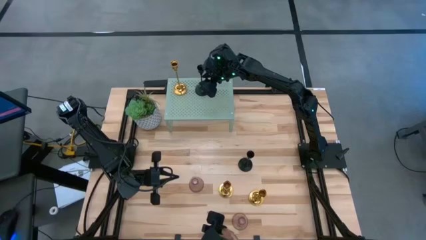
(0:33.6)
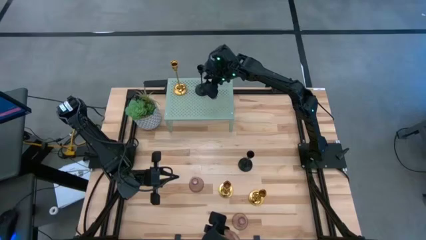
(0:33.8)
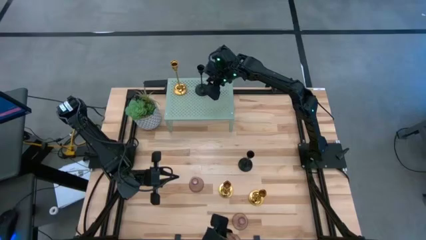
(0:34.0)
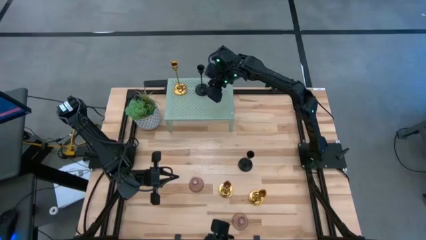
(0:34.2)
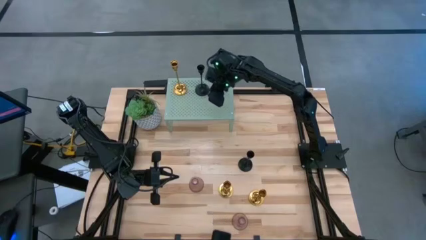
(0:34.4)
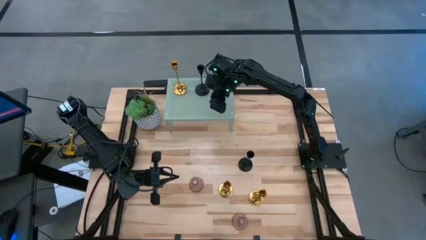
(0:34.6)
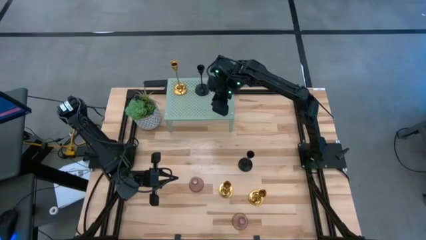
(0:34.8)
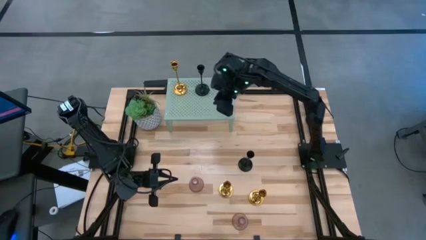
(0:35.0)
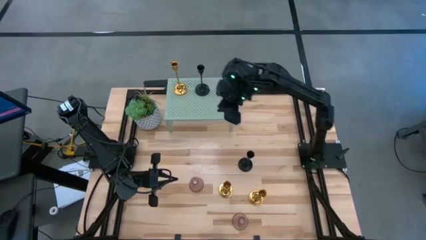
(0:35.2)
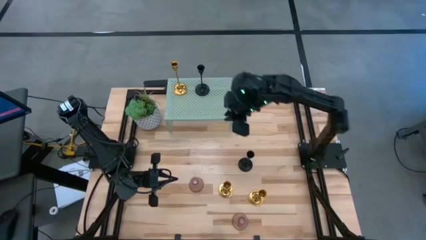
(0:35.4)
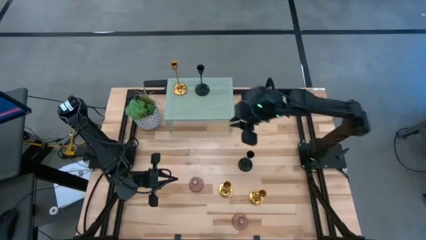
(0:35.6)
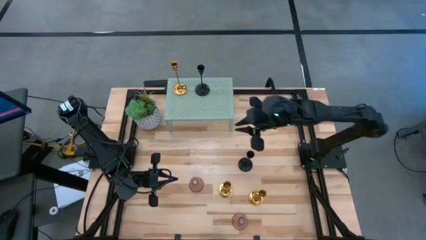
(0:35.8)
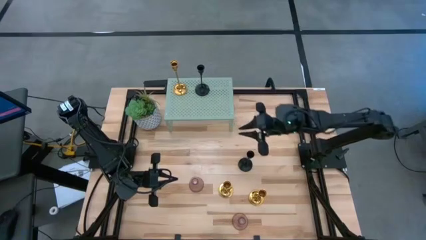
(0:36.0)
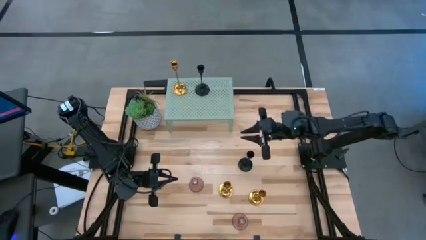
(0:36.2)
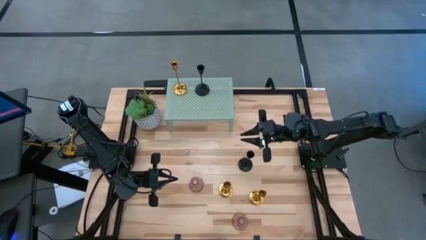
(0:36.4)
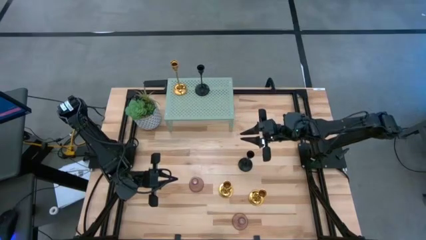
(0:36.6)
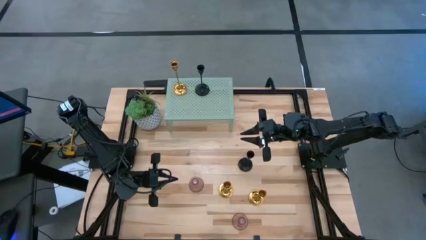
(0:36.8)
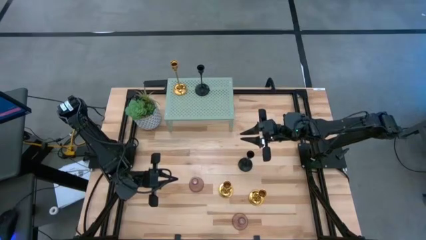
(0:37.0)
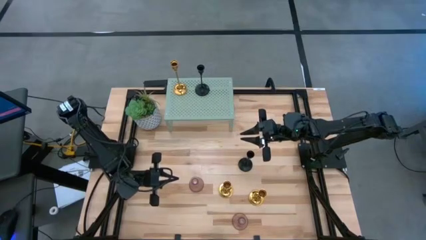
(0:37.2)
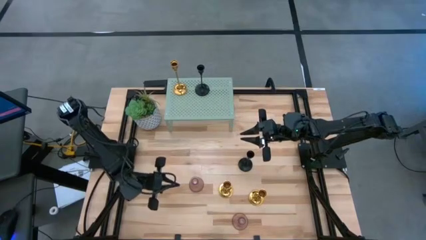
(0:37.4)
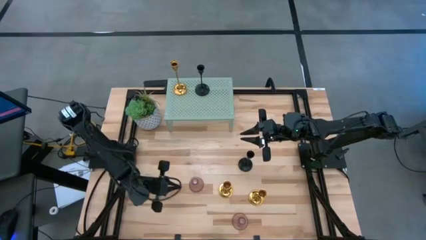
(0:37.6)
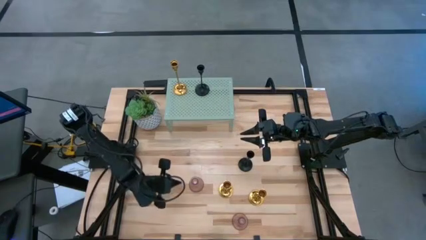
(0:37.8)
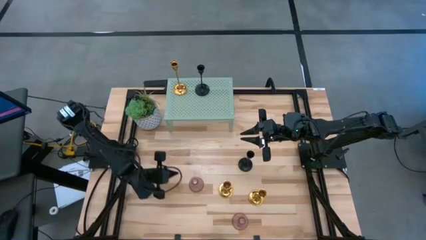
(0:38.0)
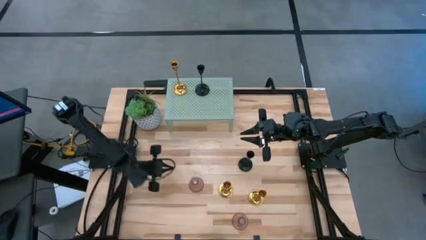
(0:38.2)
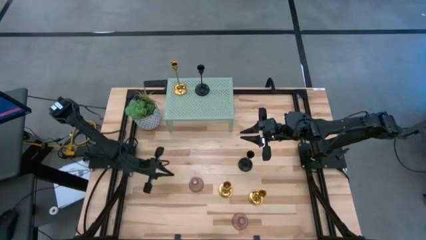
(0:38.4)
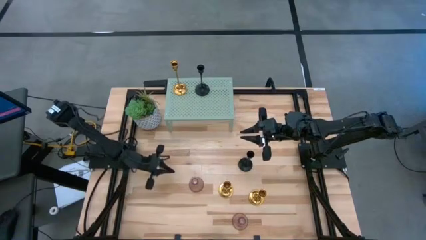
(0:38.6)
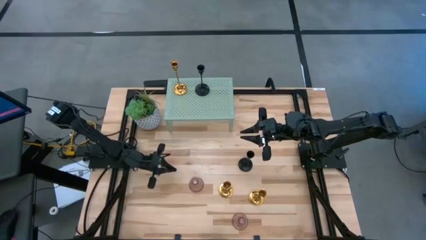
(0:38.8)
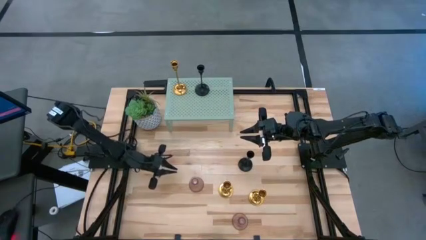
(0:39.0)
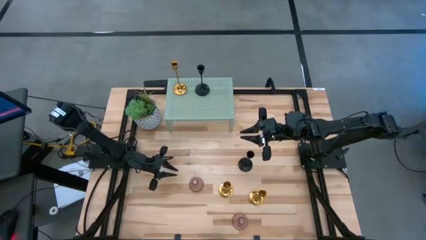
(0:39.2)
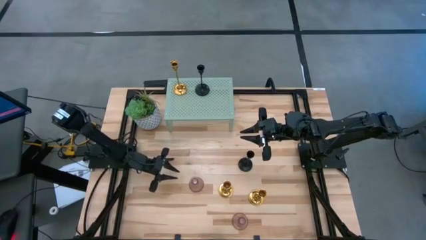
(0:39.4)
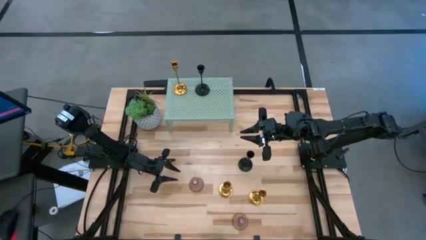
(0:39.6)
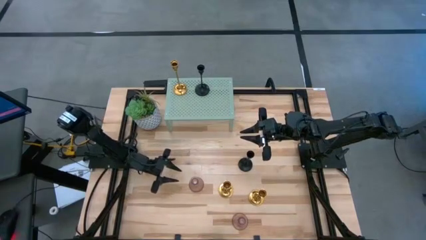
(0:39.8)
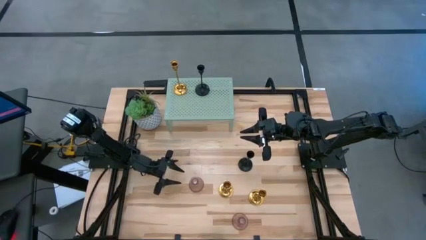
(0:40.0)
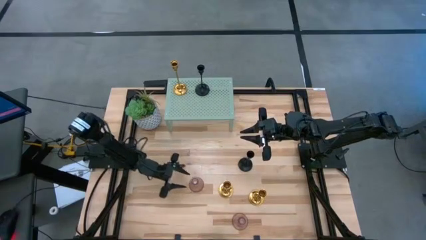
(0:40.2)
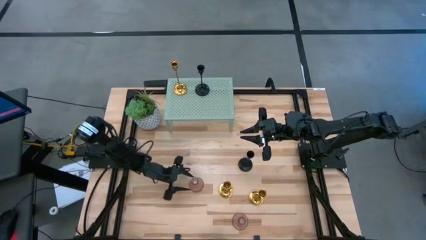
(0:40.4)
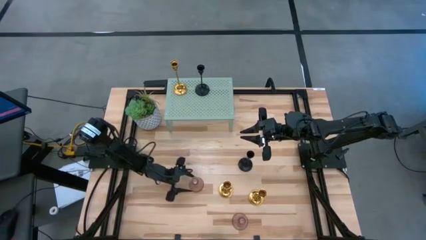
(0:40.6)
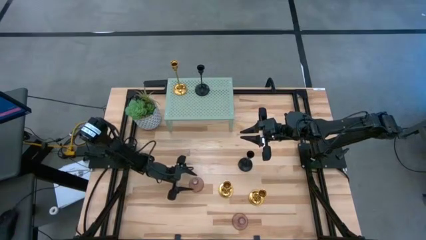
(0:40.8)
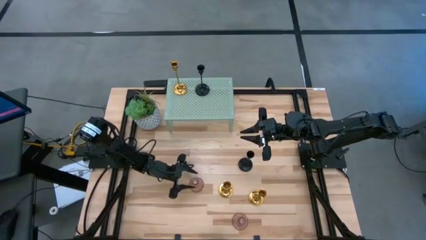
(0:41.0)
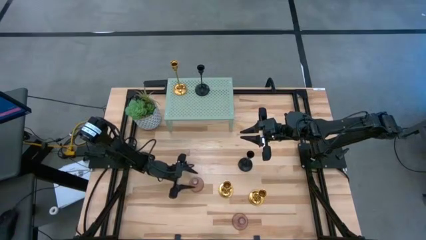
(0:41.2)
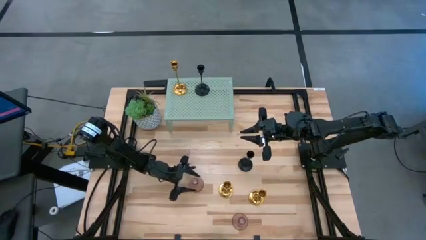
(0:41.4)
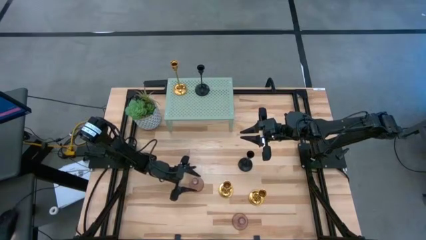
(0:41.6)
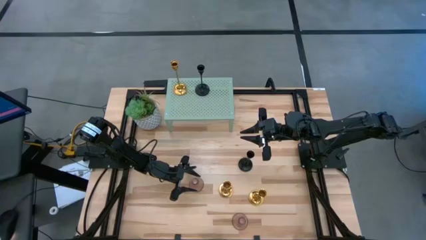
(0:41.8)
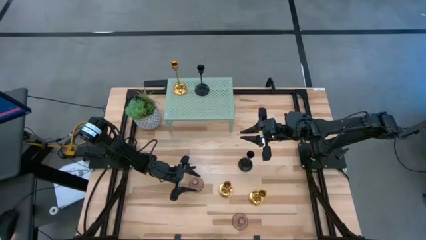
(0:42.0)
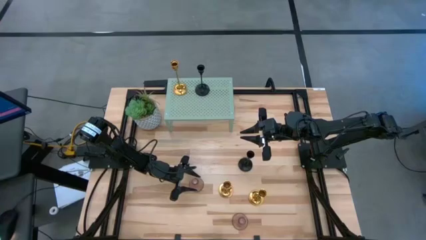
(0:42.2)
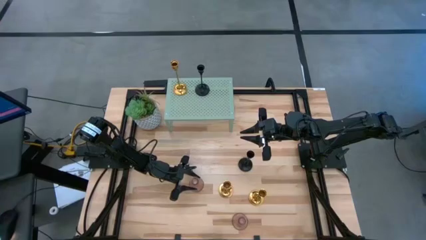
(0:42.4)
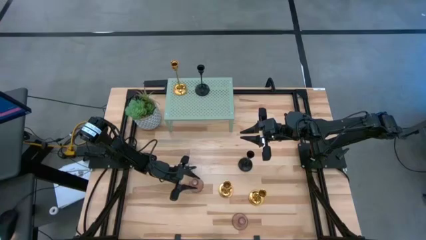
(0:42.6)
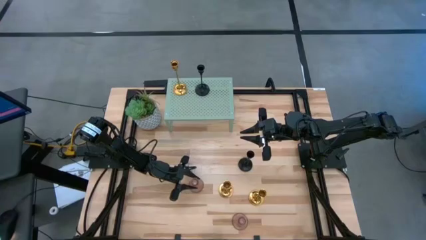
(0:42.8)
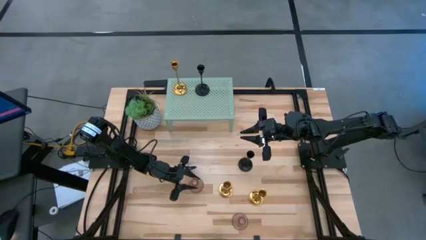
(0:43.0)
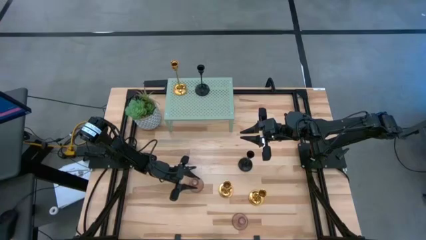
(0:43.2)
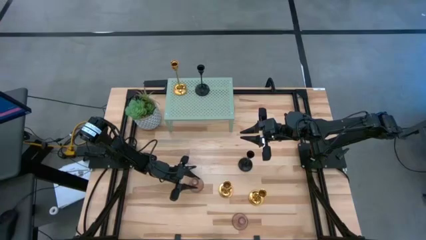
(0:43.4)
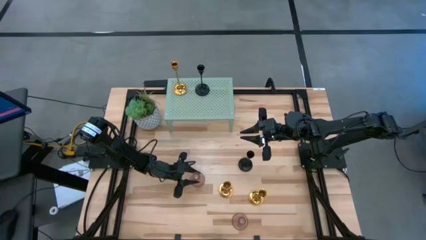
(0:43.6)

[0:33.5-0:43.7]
Task: Pick & Place candle stick holders
Put the middle pink glass candle holder on the shelf

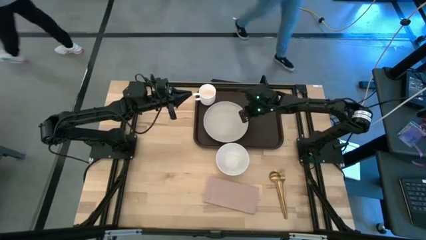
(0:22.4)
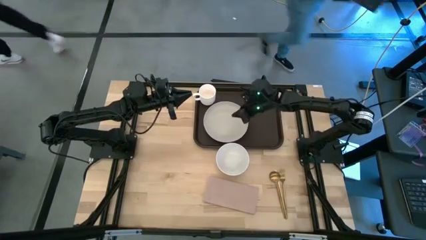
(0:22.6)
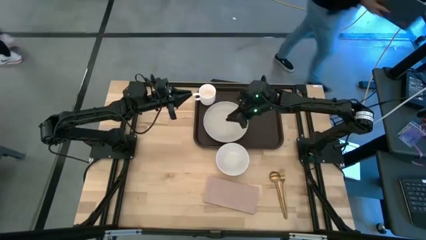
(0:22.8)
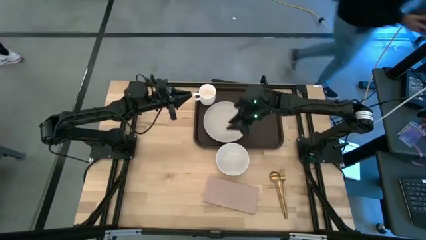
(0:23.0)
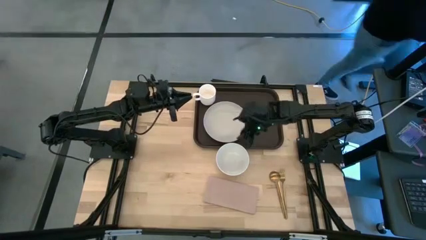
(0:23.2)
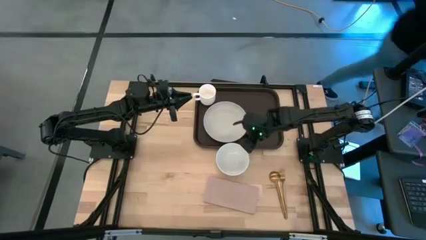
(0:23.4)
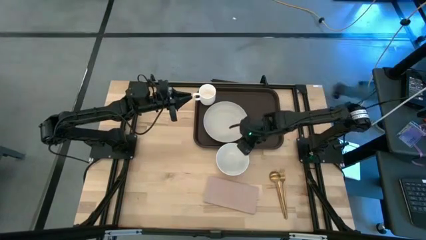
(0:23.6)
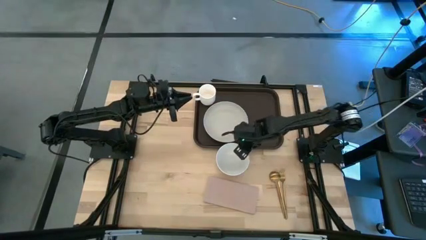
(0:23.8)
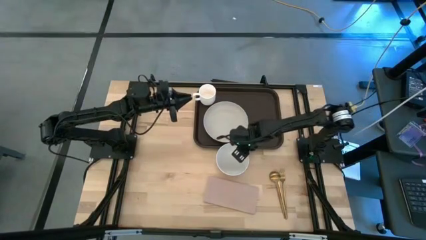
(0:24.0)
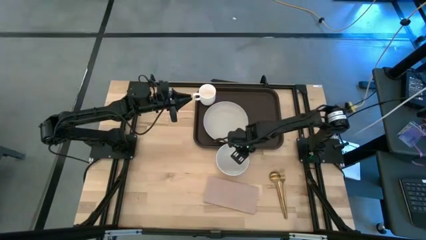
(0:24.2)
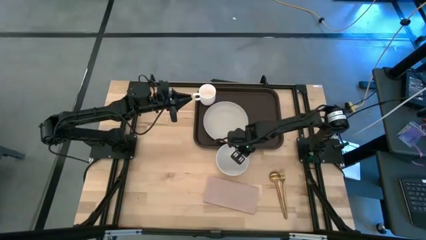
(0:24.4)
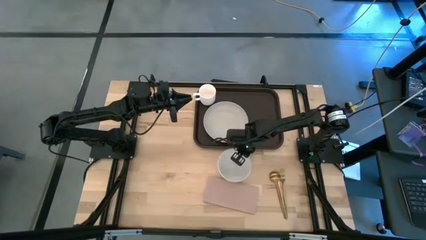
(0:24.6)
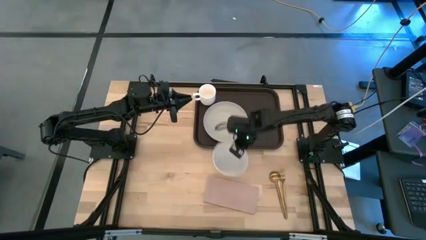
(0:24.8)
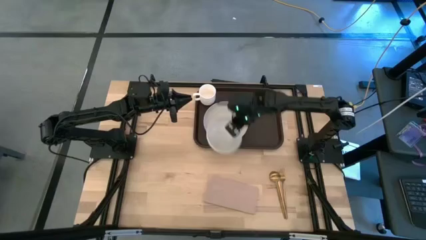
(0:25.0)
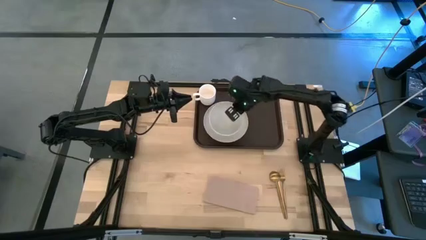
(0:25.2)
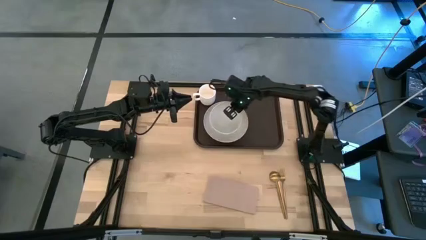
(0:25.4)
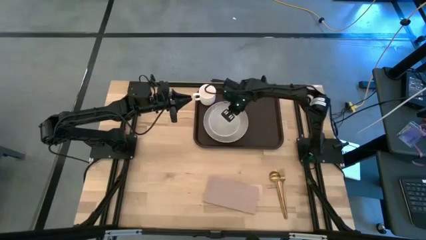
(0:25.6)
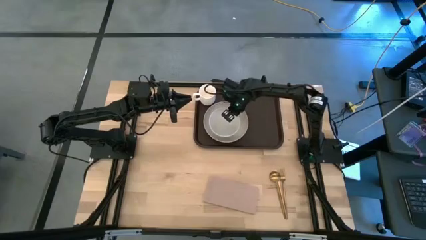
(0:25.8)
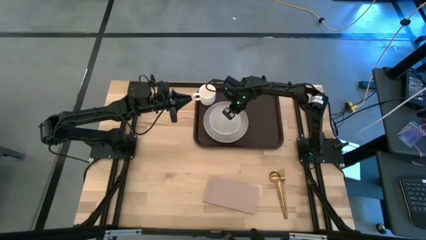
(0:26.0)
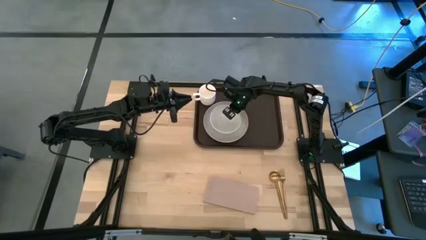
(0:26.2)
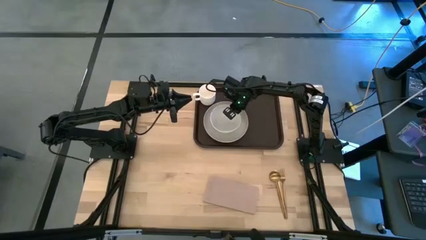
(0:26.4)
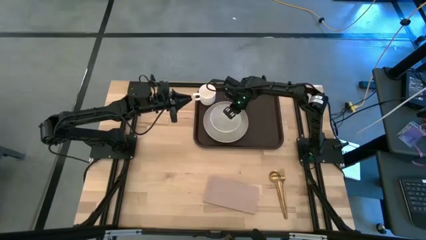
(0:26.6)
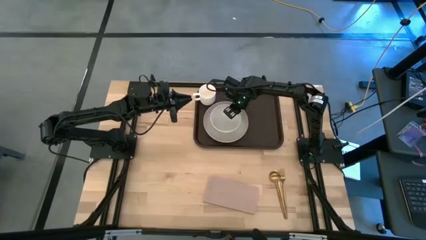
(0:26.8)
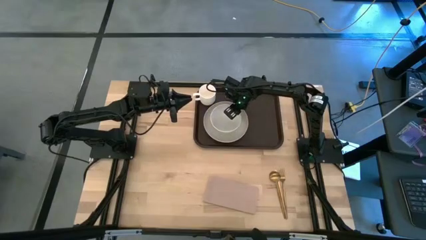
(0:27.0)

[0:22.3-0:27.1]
Task: Set up tray
Put the white bowl on the gray plate on the black serving tray
